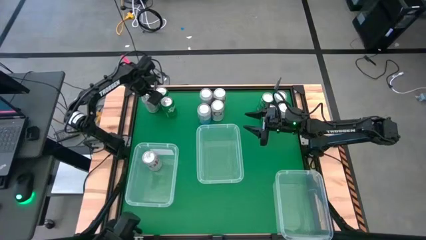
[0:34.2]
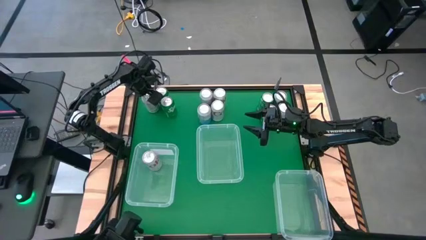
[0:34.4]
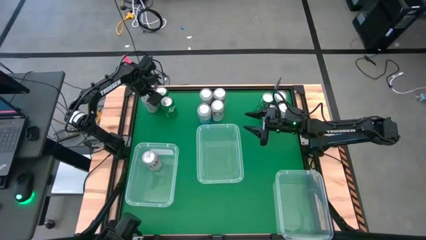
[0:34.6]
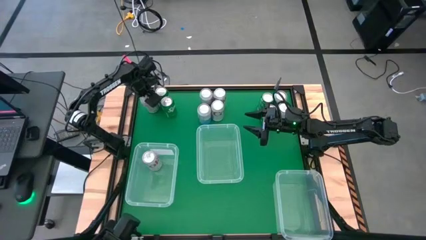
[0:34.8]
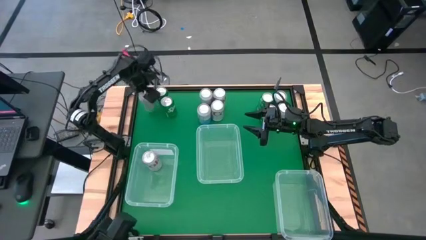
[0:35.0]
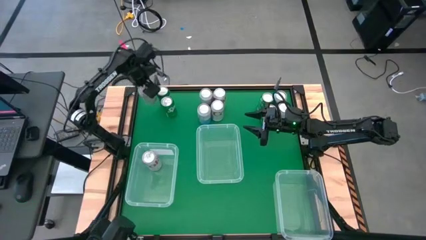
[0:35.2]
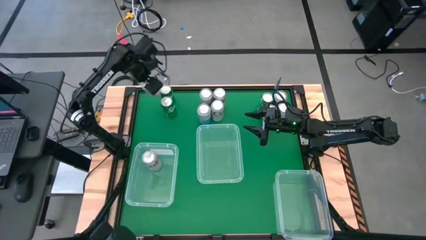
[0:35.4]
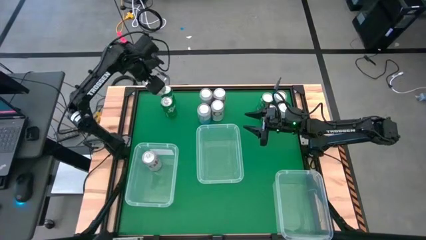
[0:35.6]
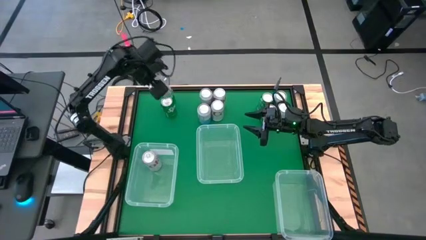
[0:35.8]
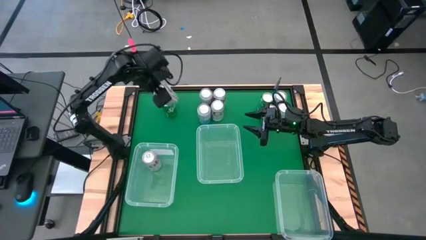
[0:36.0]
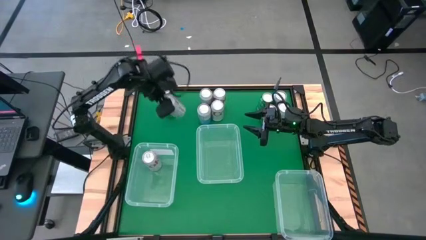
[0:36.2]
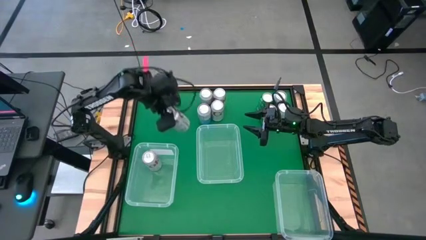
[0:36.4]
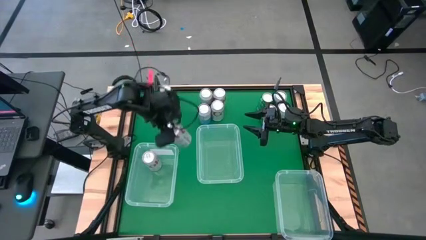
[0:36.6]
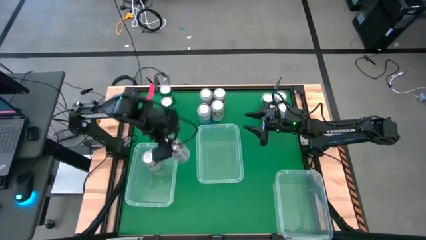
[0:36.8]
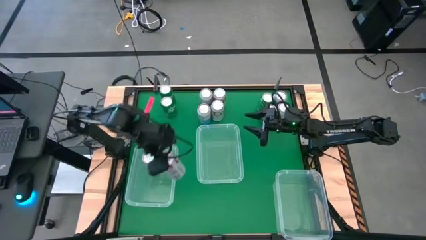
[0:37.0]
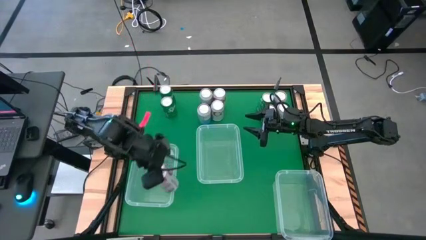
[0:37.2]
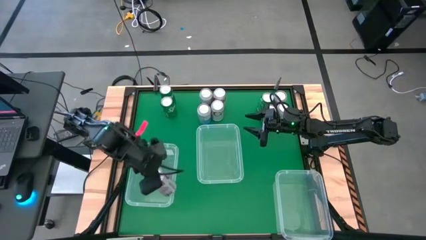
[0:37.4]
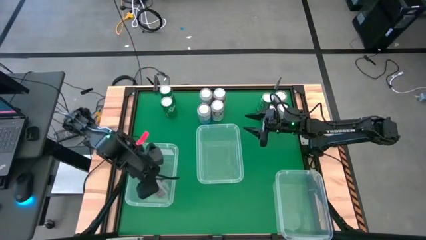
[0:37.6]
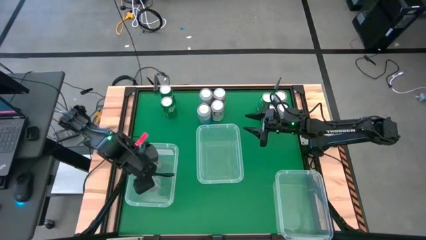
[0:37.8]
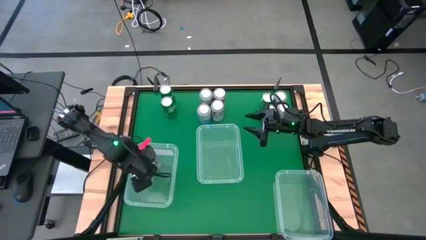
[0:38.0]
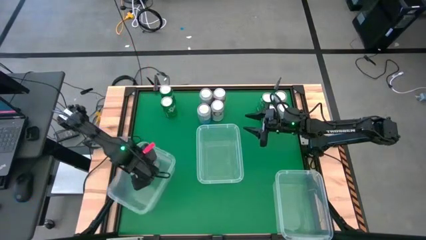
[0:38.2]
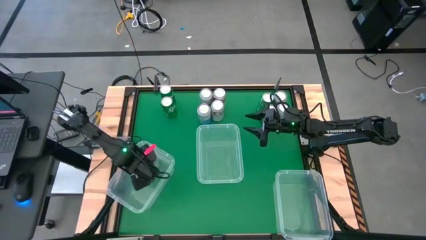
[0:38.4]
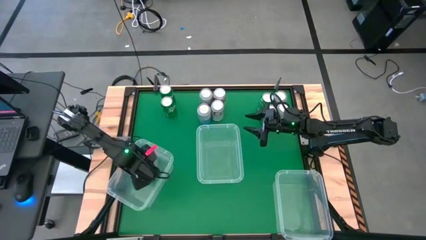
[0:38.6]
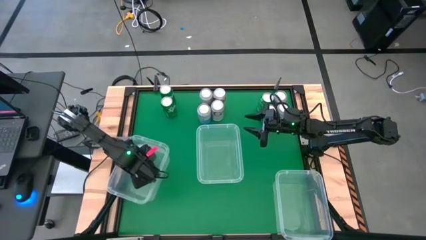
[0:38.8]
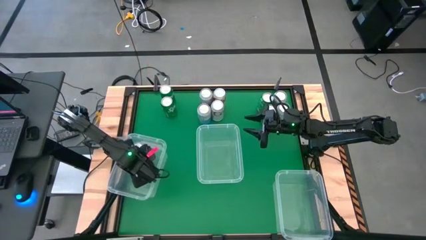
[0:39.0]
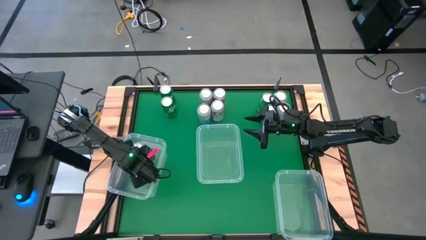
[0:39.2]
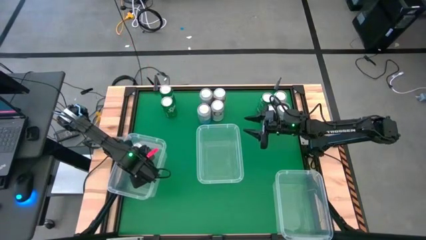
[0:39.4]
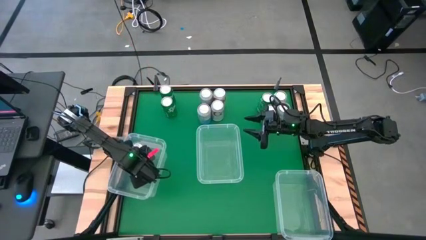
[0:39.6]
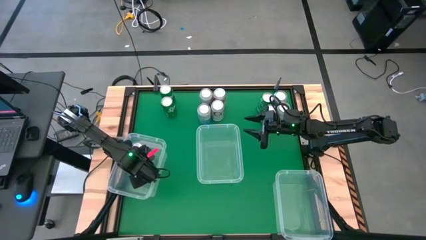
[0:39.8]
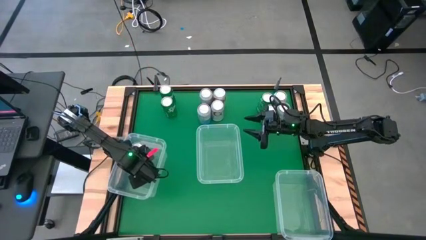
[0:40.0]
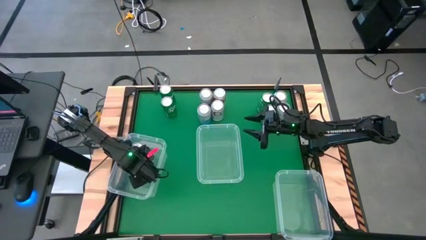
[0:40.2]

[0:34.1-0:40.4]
Task: Sort soda cans
Put the silver soda can into the bottom left transparent bin

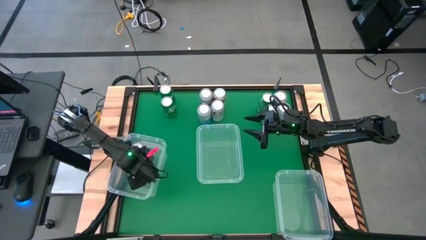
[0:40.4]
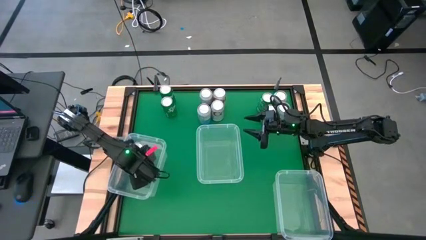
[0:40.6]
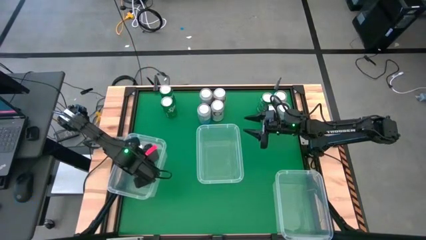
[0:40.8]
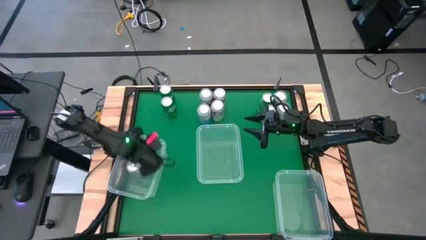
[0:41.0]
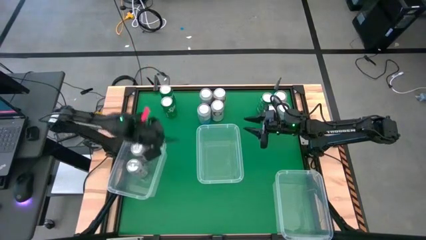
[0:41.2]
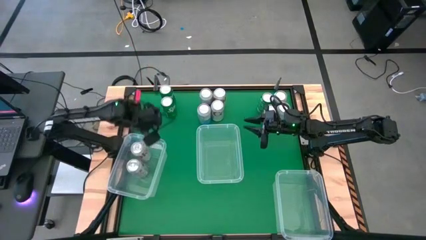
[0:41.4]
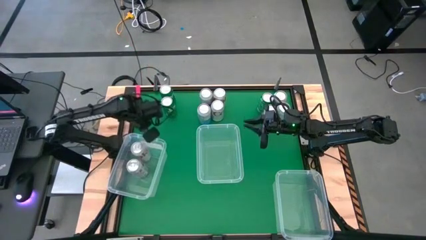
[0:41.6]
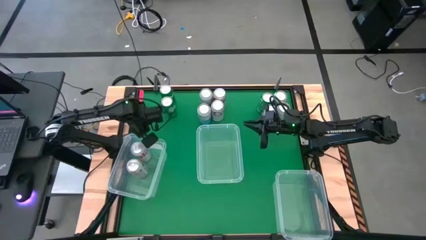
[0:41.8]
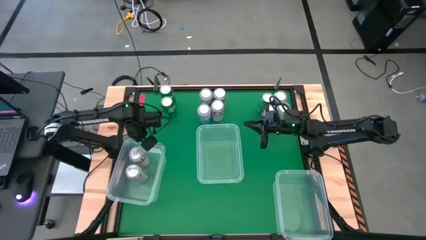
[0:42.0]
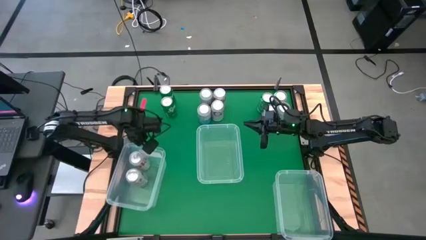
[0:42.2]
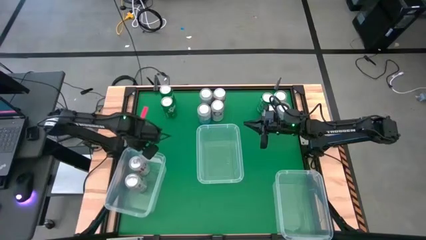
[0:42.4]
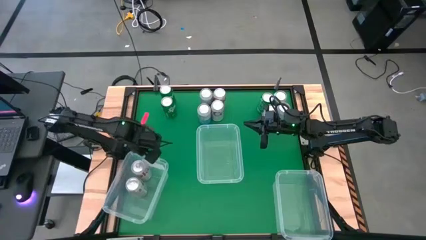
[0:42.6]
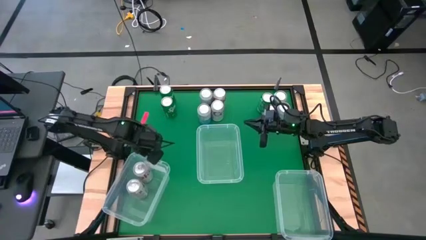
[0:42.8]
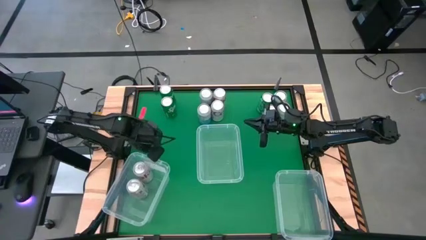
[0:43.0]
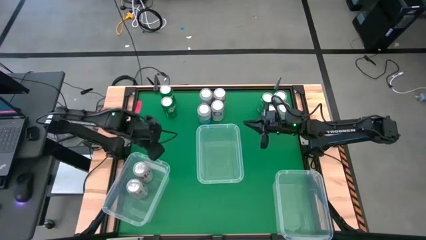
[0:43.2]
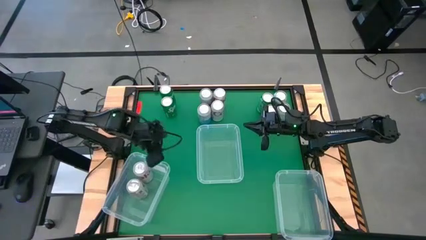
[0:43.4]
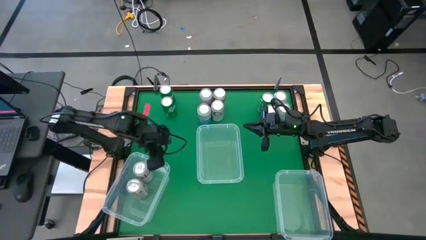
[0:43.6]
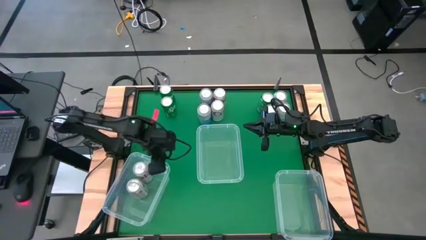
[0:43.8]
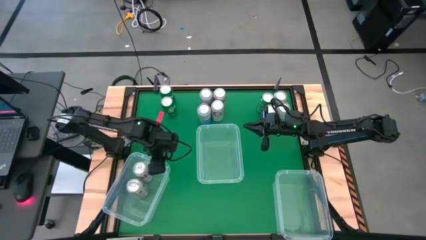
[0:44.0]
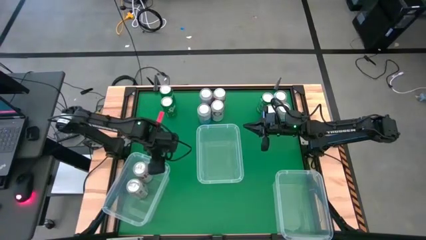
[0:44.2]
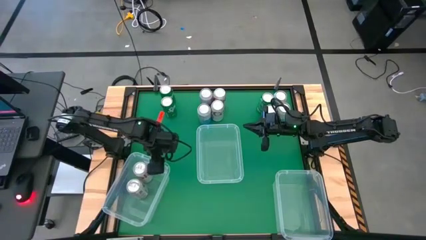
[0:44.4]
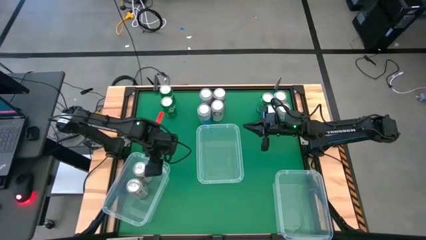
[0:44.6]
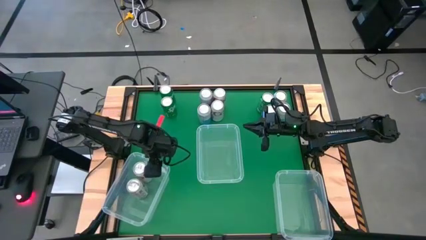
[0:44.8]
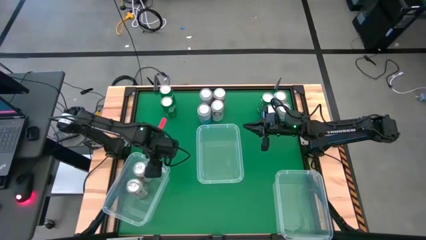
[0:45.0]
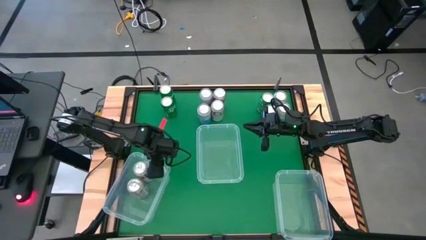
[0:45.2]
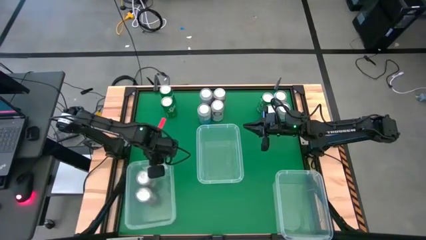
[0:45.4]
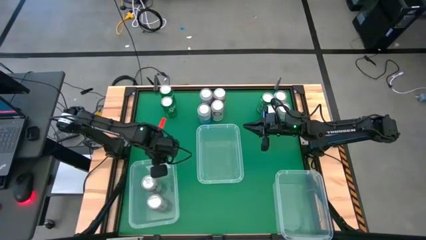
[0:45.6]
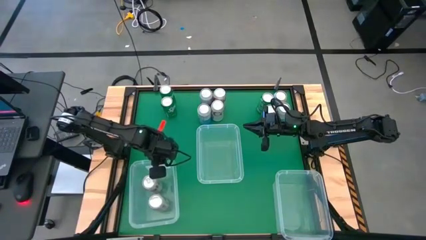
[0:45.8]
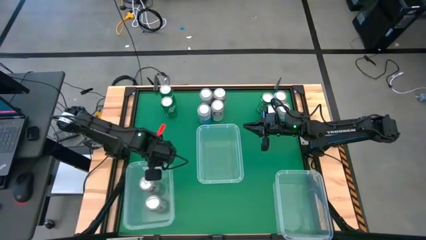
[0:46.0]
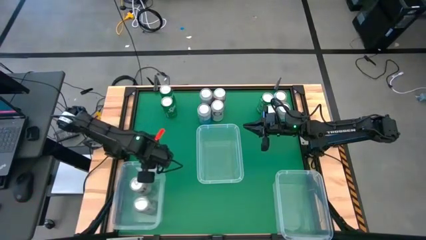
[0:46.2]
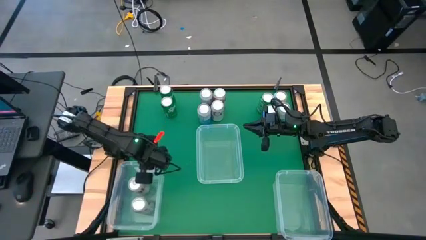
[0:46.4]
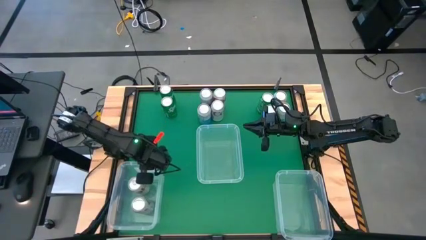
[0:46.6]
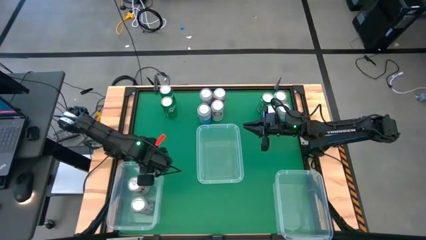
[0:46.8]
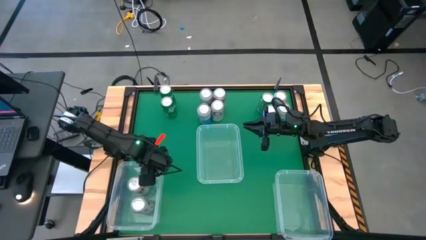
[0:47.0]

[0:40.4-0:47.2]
Adjust the bottom left transparent bin on the table

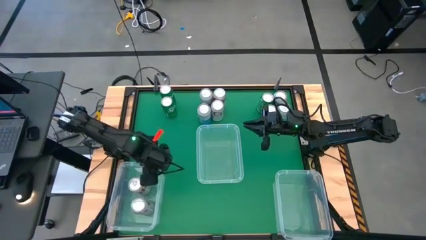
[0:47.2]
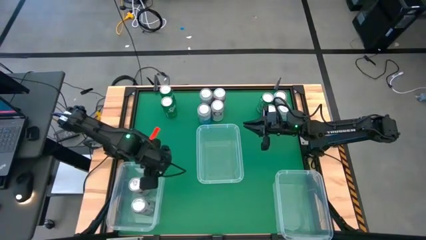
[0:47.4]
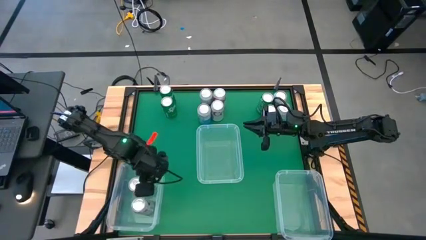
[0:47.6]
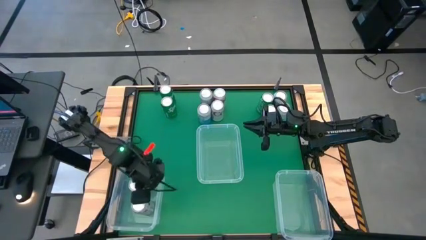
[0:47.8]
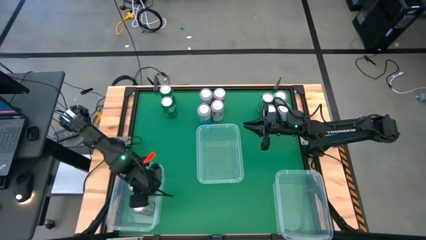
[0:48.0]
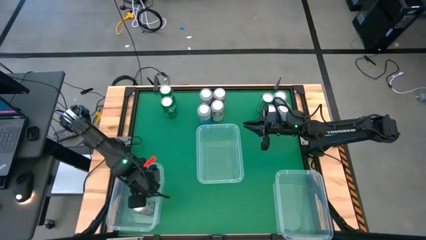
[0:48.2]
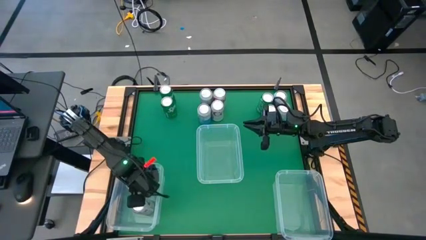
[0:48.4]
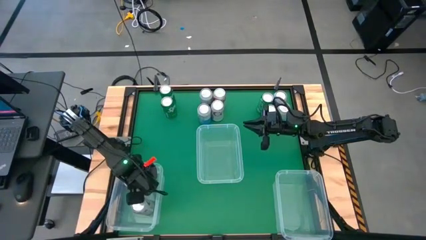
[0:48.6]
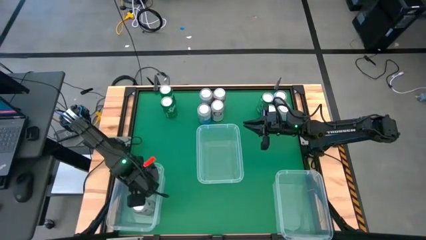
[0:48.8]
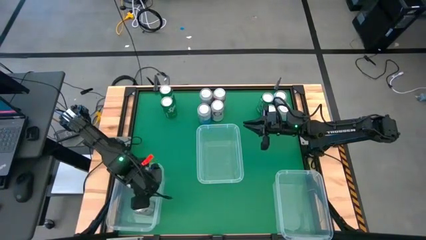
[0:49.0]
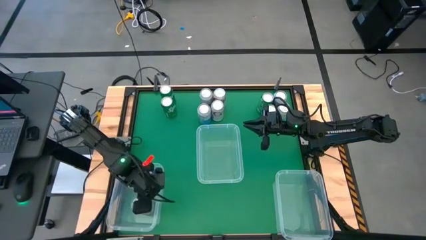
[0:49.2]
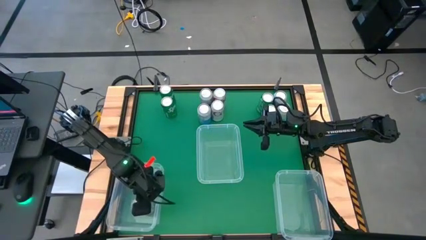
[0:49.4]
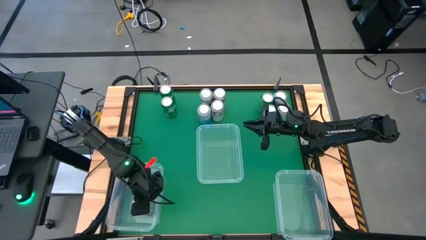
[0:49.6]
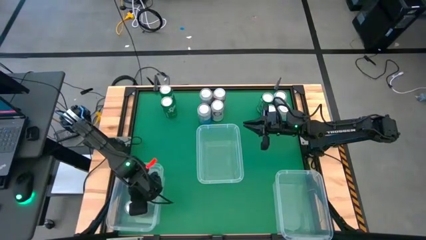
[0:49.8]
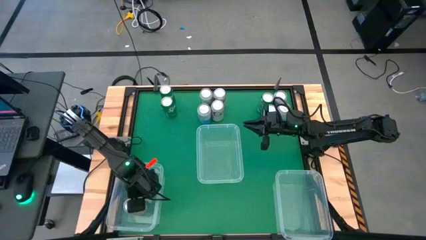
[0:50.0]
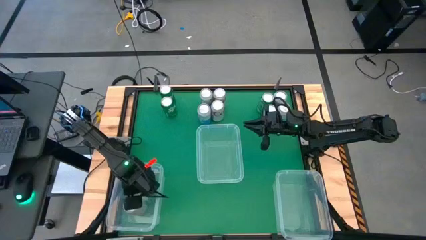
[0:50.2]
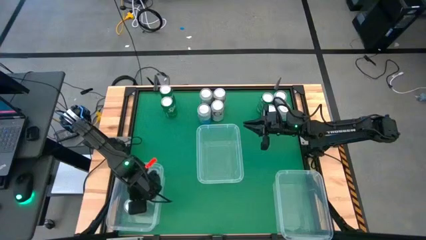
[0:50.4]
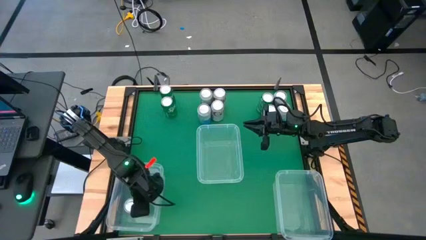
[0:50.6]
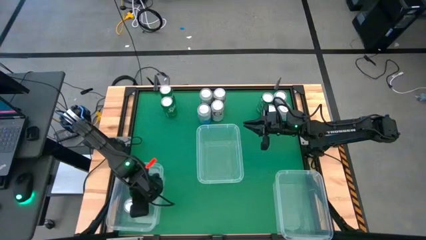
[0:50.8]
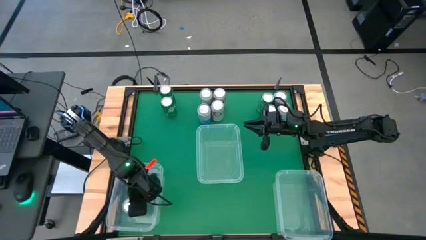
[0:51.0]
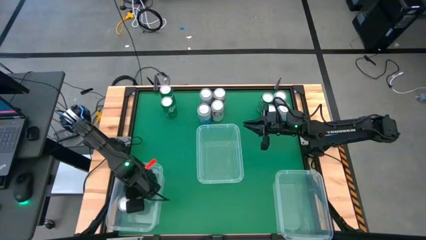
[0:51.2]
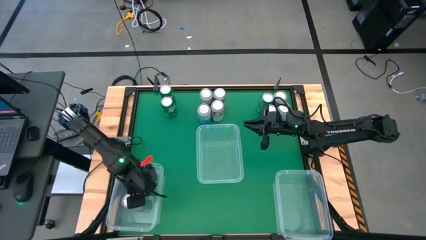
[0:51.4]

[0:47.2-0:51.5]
Adjust the silver soda cans in the bottom left transparent bin
